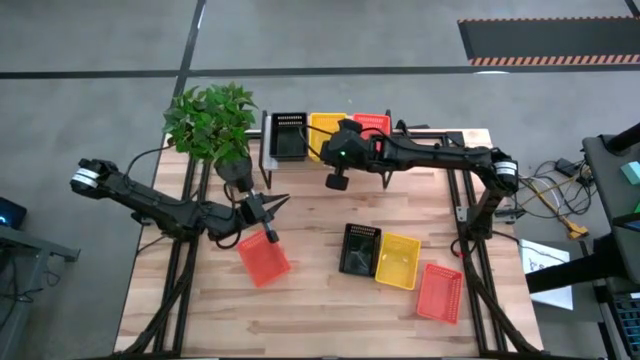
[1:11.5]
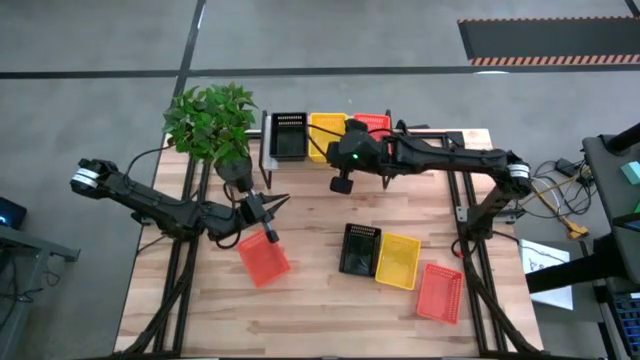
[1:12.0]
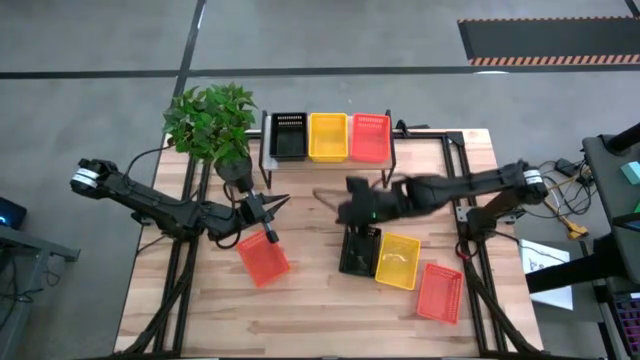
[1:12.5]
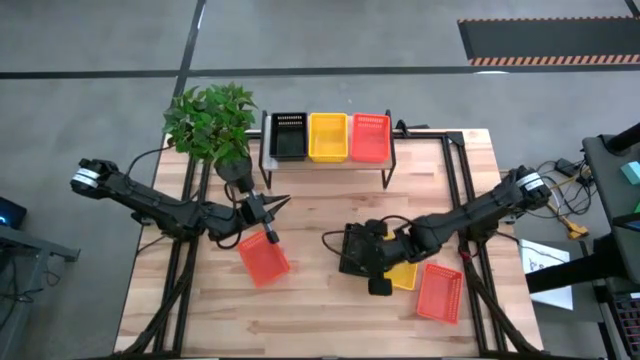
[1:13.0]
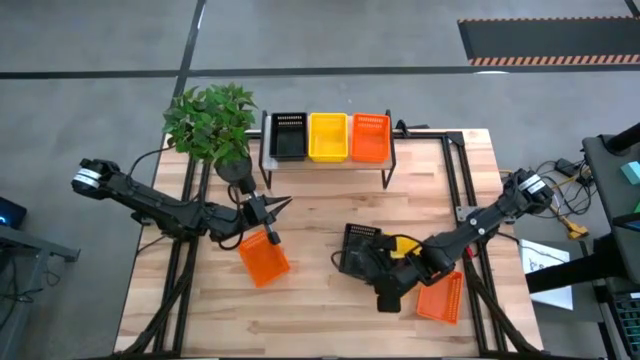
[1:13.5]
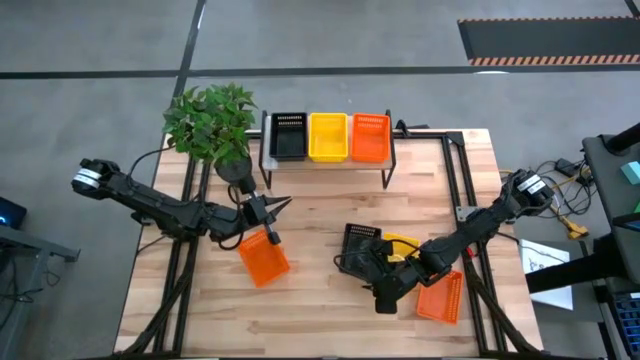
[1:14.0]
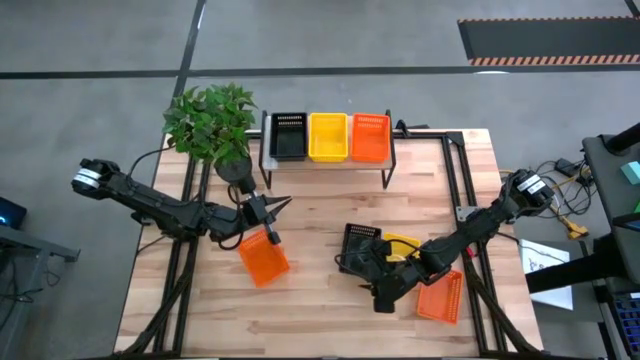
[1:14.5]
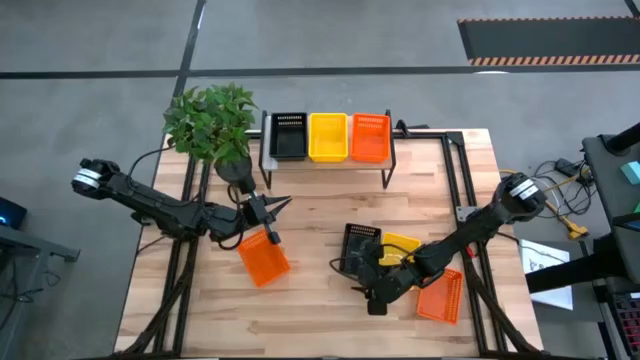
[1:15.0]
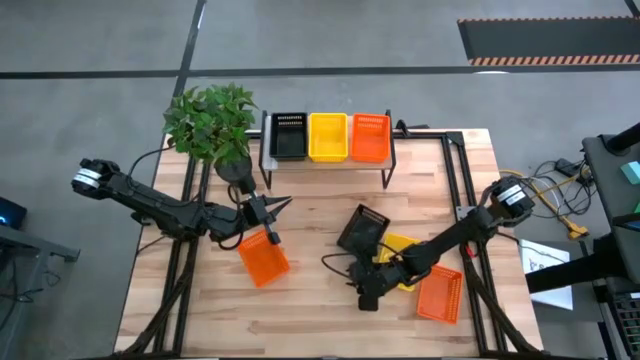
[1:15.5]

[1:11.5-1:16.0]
Task: Stack baskets on shelf by color
Stack the black bin on top of the other black bins on the shelf

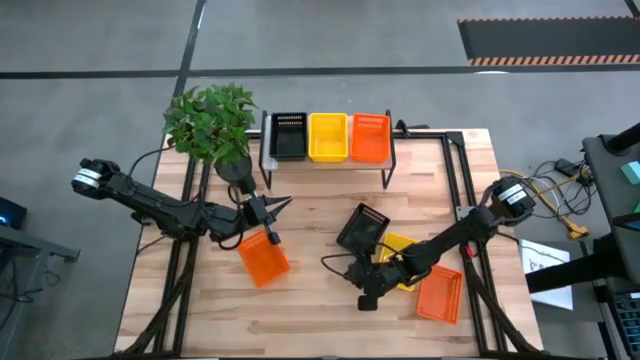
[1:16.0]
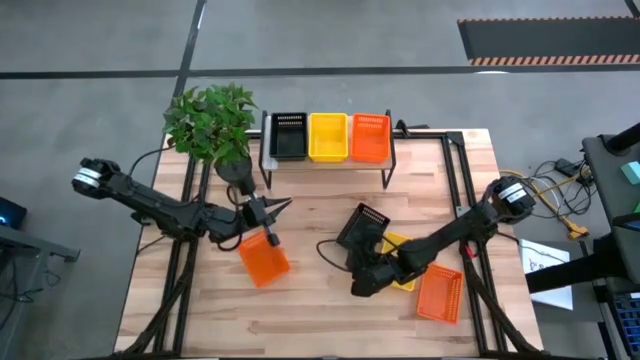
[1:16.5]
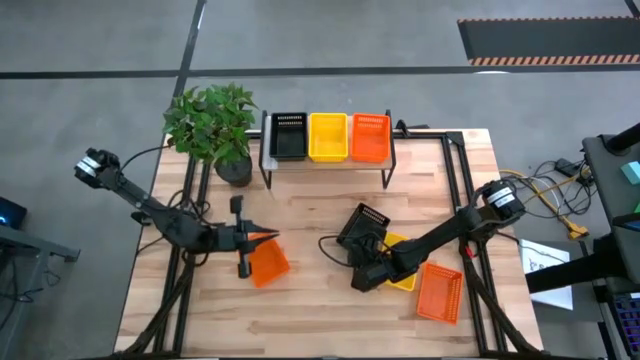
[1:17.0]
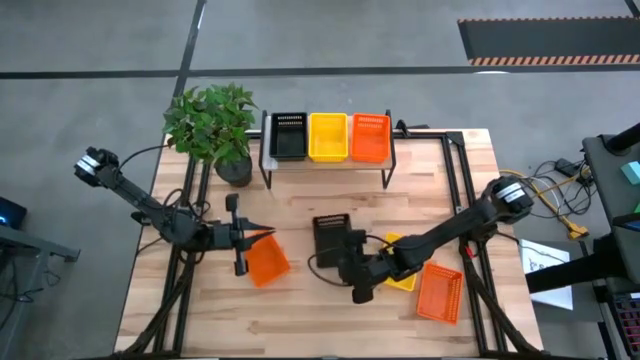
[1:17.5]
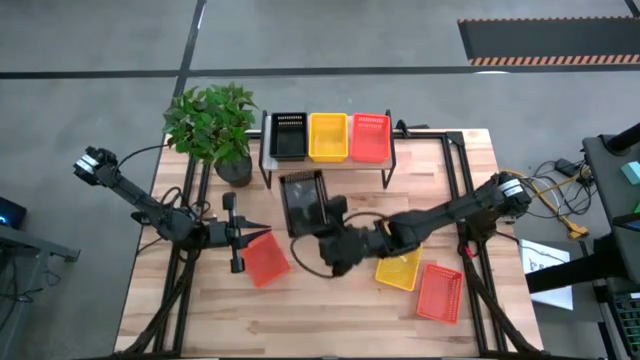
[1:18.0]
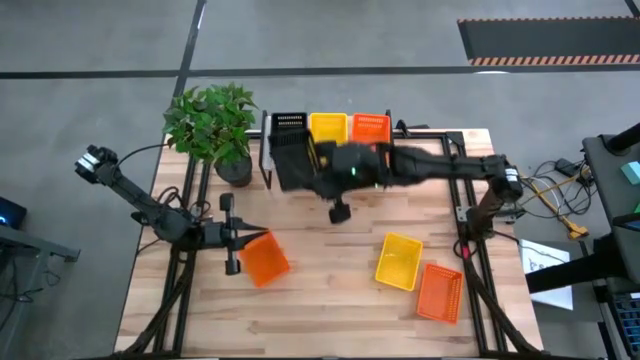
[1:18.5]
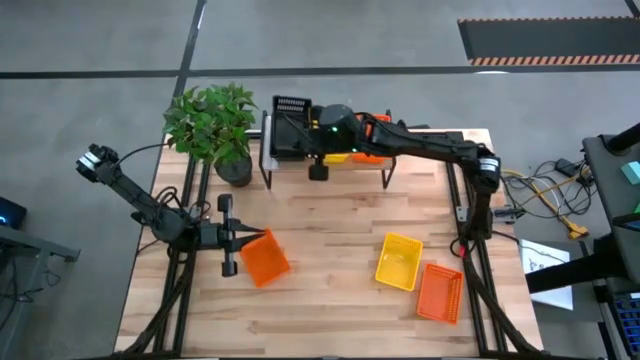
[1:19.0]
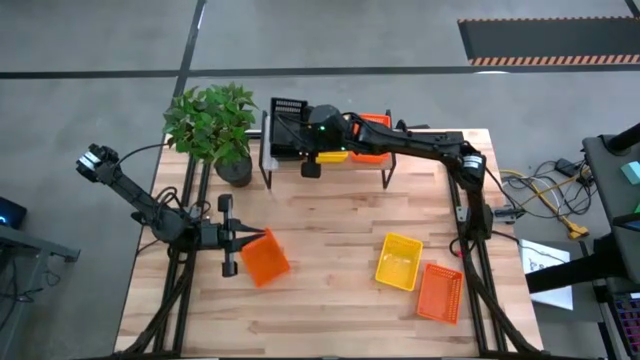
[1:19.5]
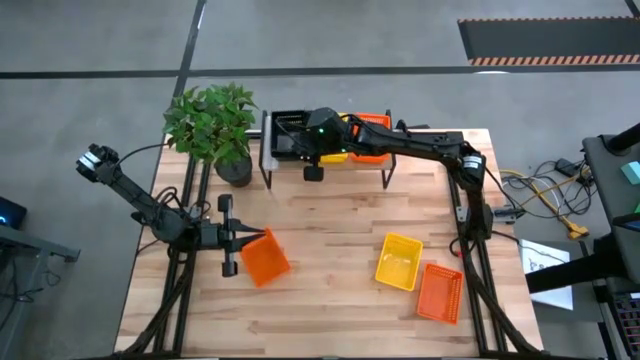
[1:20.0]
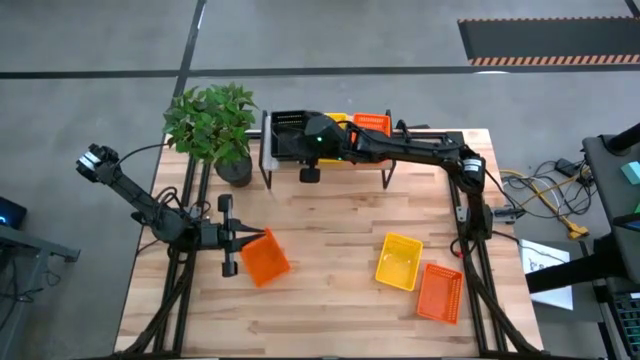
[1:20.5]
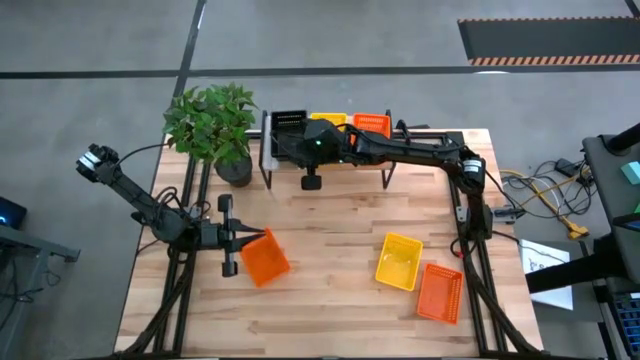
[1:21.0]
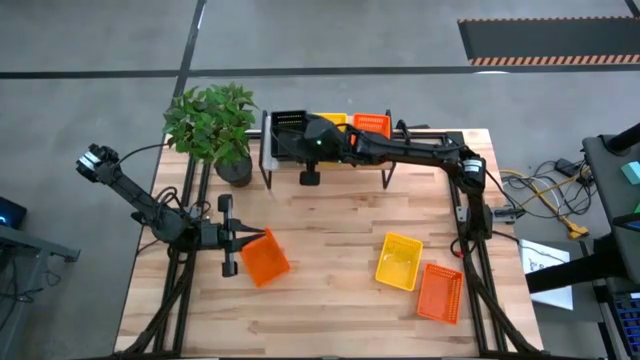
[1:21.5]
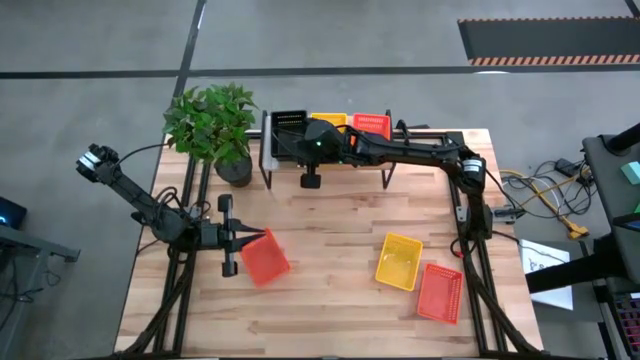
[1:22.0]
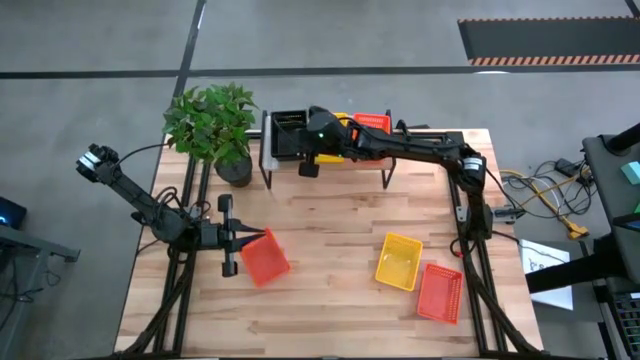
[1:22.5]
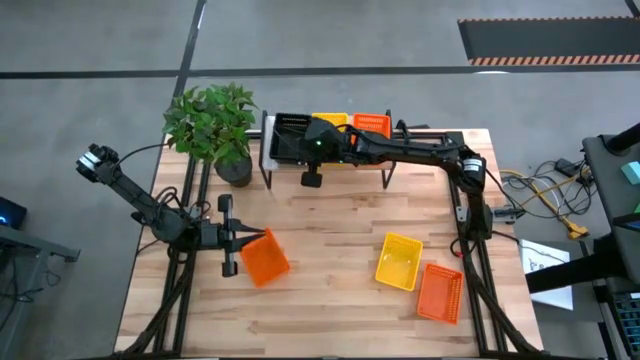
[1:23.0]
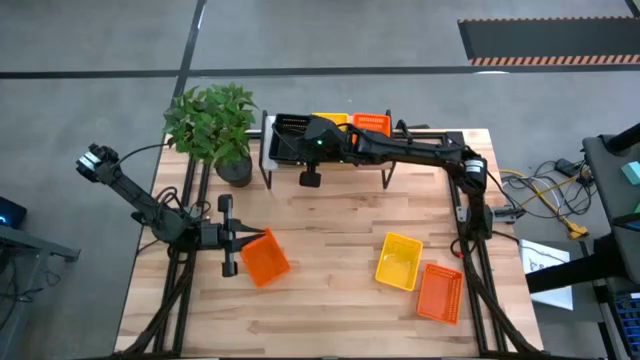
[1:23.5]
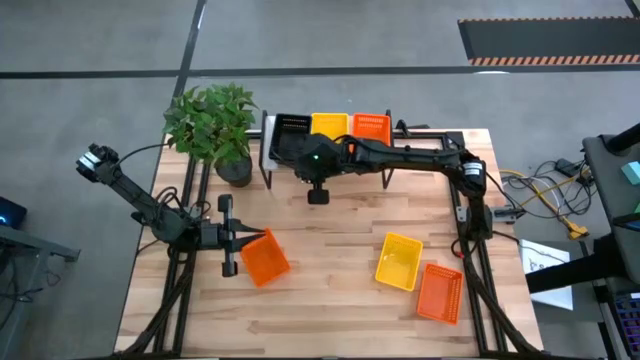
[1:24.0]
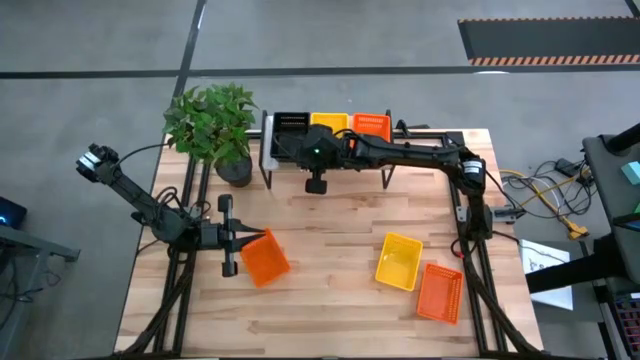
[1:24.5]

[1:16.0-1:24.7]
Stack the black bin on top of the other black bins on the shelf

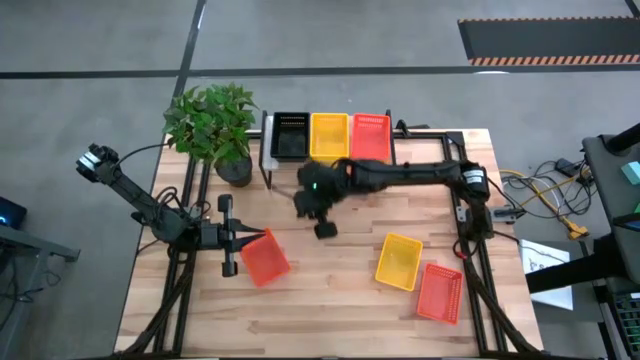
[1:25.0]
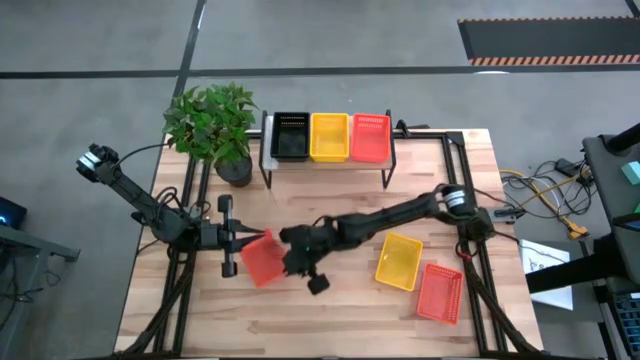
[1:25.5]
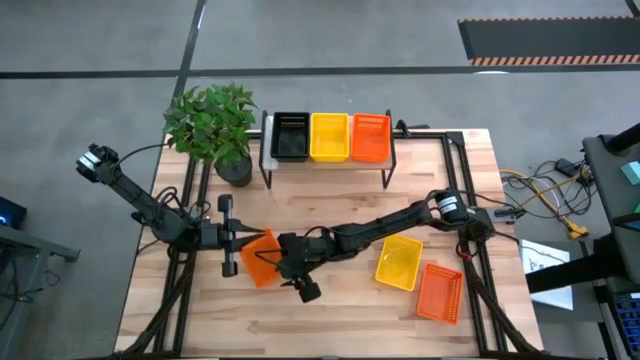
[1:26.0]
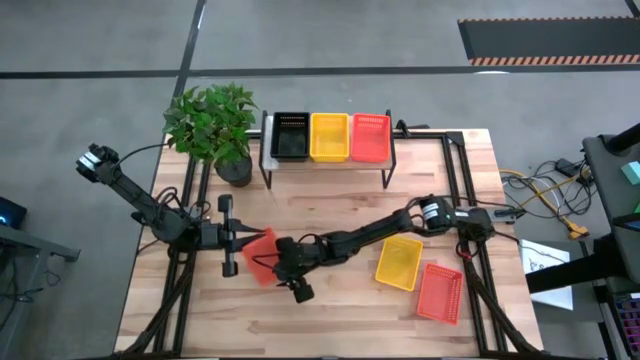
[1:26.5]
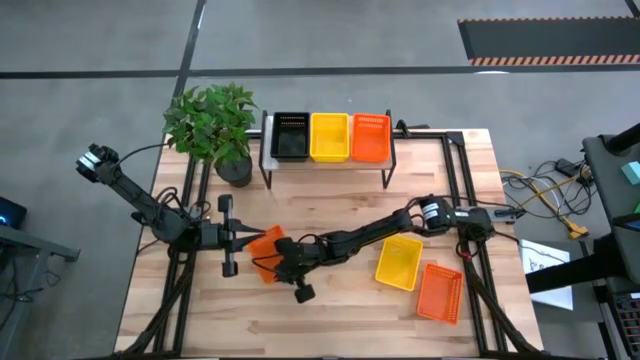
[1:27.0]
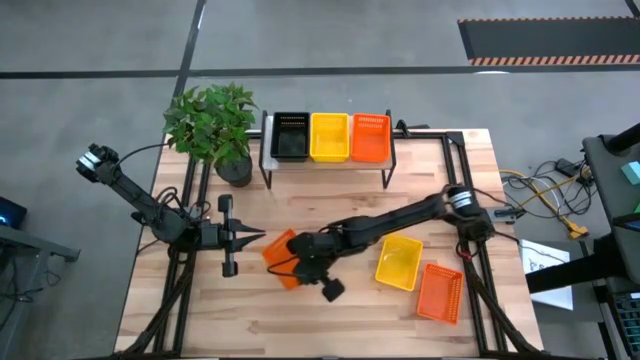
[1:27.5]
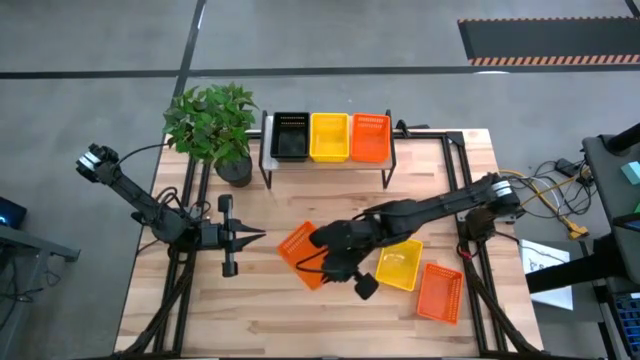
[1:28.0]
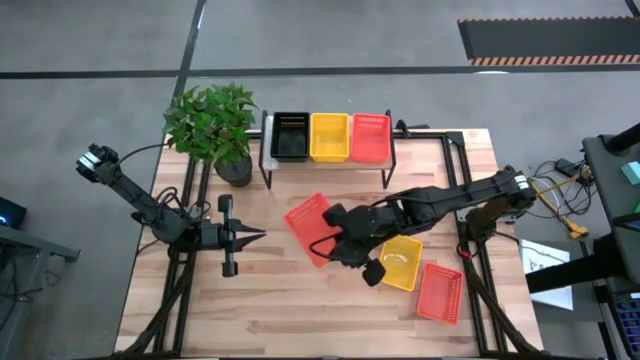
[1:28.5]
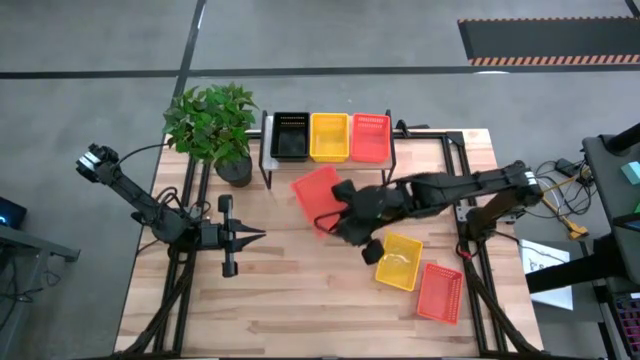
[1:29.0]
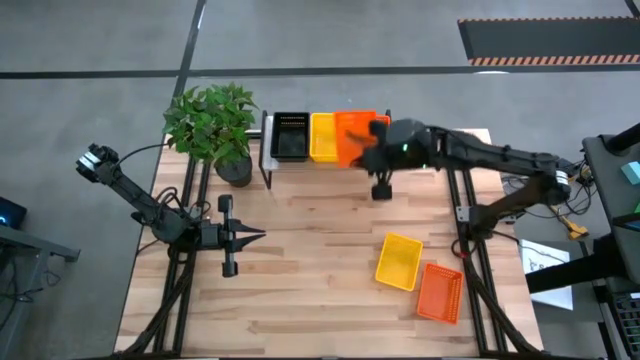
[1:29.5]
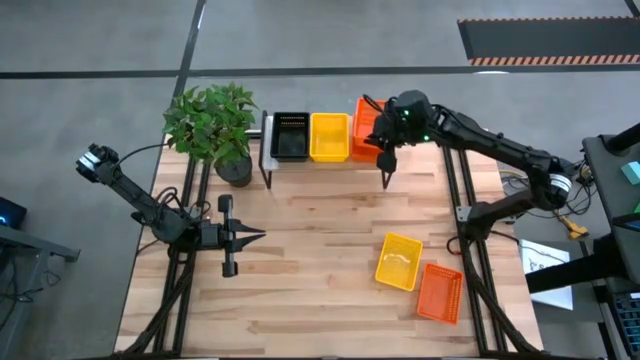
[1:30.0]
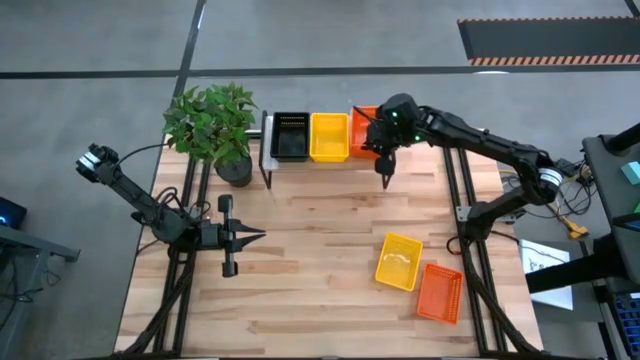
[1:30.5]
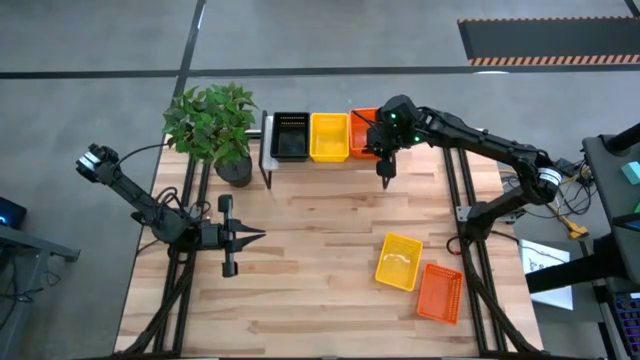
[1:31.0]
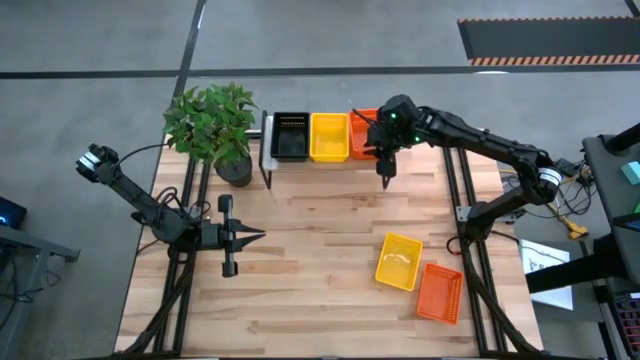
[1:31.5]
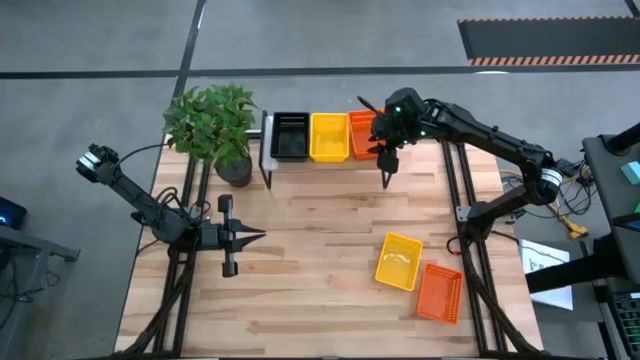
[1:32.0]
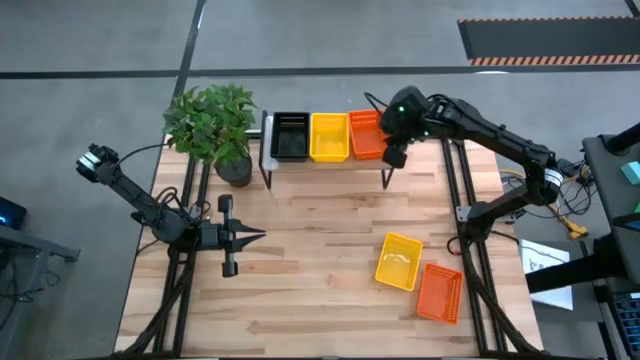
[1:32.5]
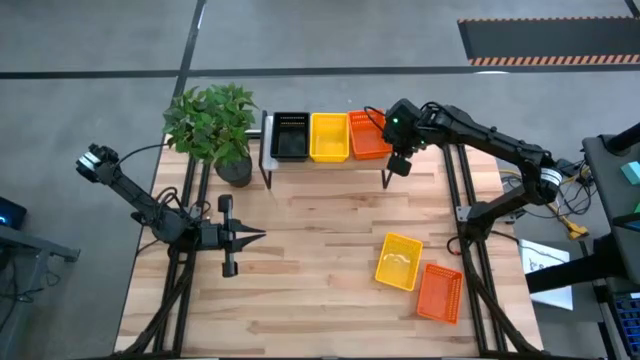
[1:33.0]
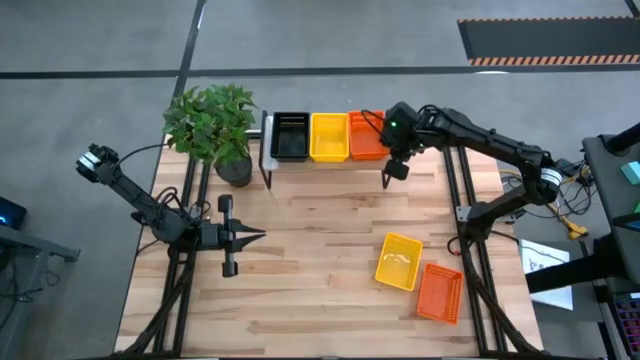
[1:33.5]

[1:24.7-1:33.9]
Stack the left orange bin on top of the other orange bin on the shelf
